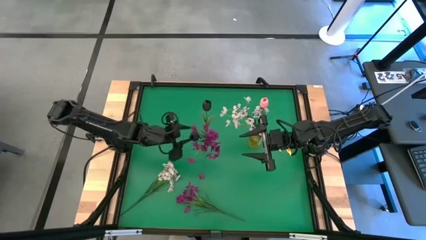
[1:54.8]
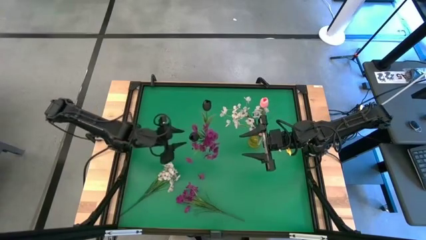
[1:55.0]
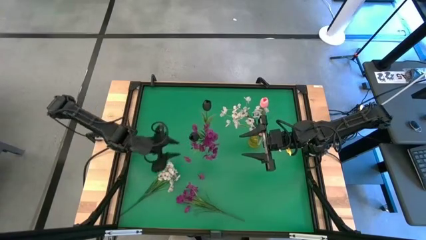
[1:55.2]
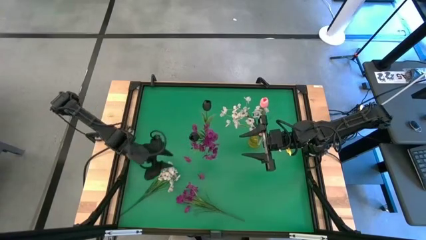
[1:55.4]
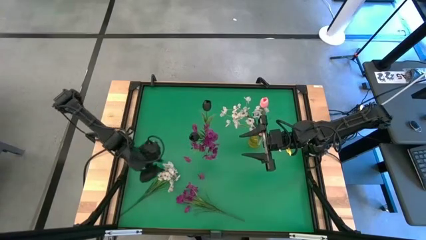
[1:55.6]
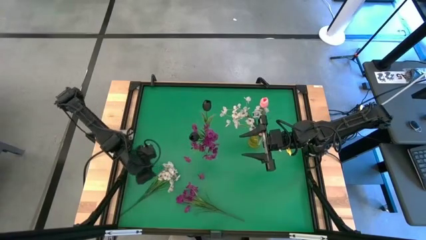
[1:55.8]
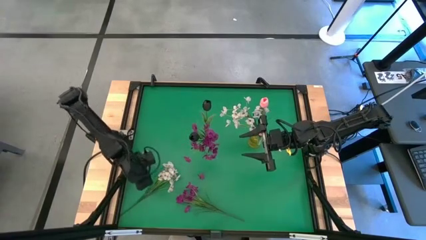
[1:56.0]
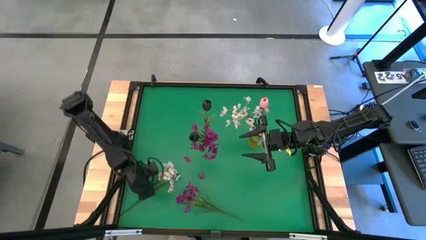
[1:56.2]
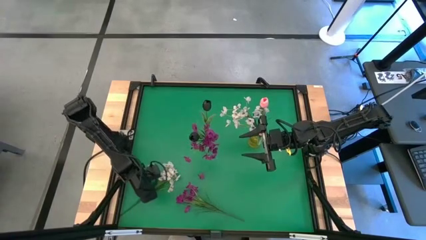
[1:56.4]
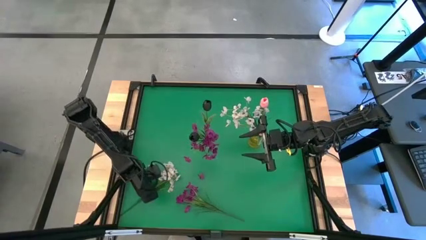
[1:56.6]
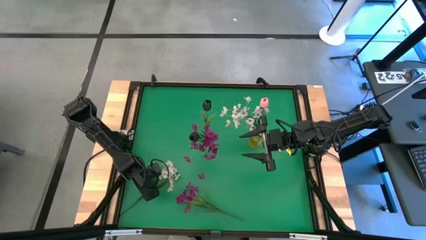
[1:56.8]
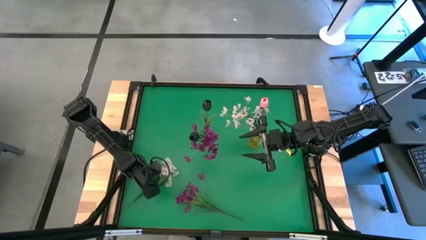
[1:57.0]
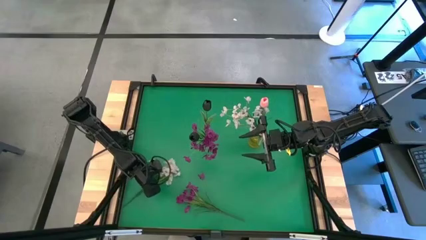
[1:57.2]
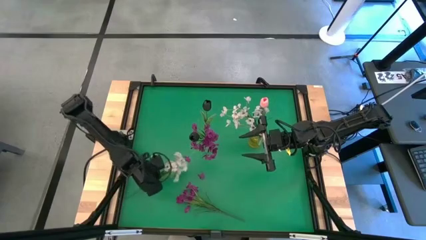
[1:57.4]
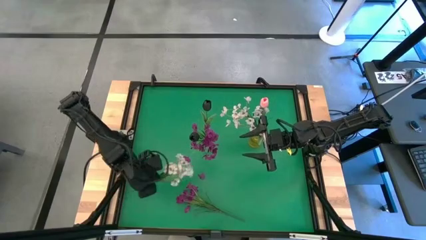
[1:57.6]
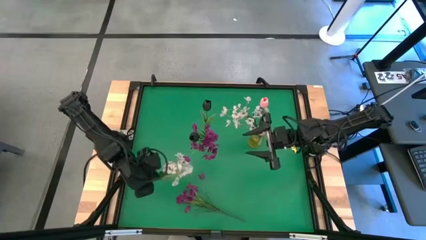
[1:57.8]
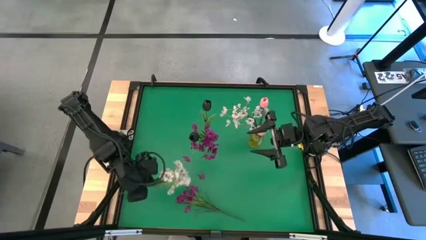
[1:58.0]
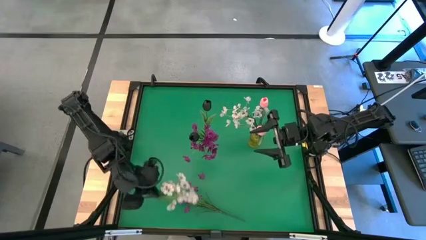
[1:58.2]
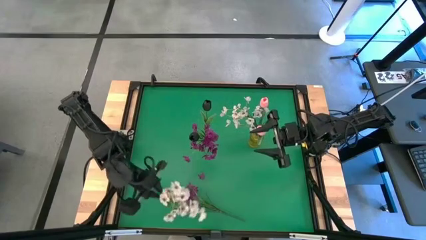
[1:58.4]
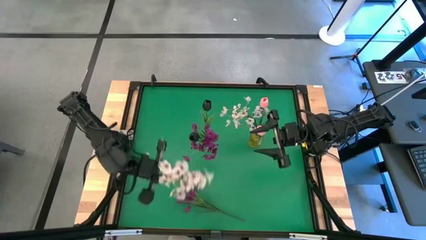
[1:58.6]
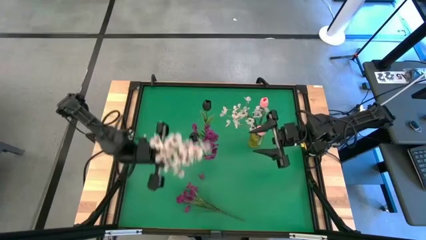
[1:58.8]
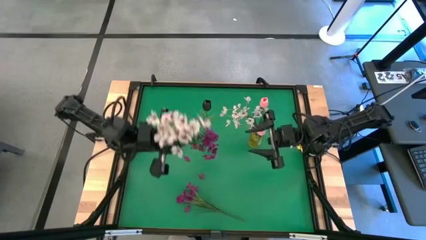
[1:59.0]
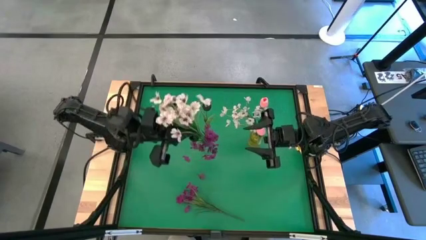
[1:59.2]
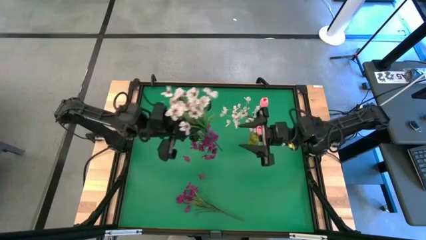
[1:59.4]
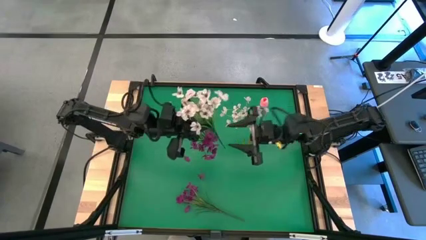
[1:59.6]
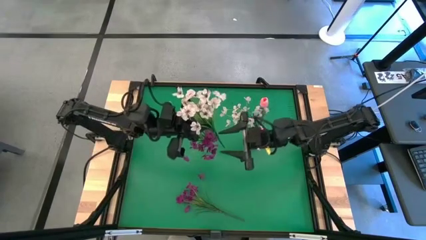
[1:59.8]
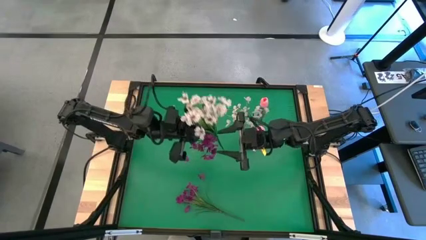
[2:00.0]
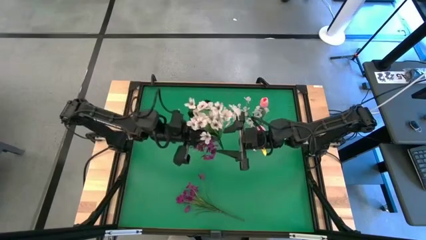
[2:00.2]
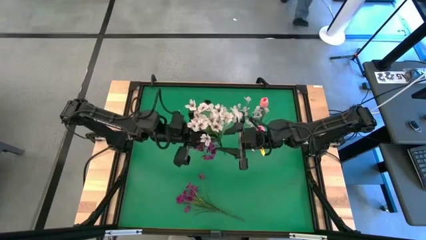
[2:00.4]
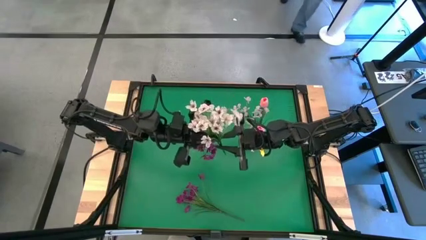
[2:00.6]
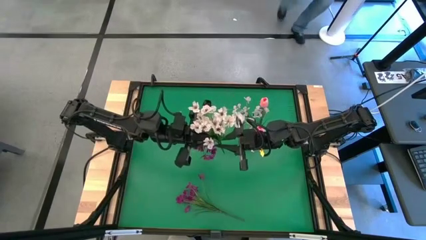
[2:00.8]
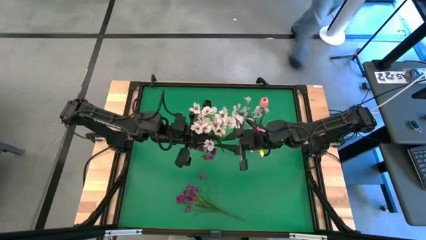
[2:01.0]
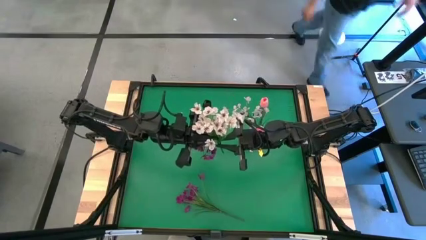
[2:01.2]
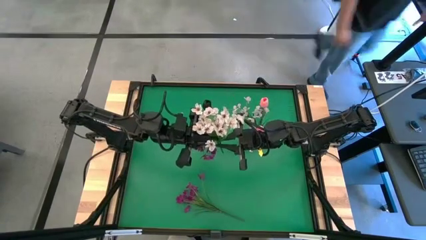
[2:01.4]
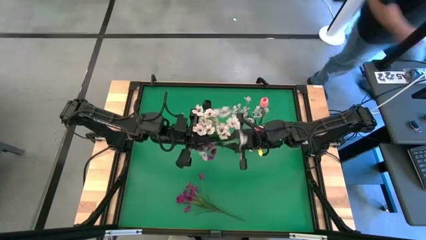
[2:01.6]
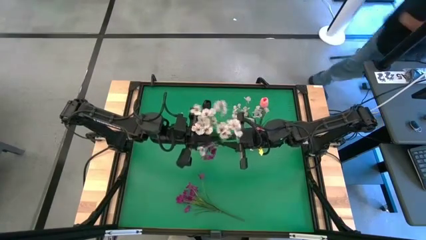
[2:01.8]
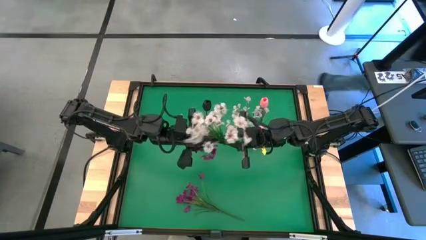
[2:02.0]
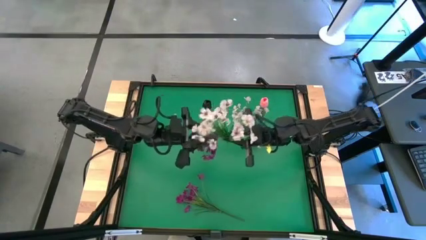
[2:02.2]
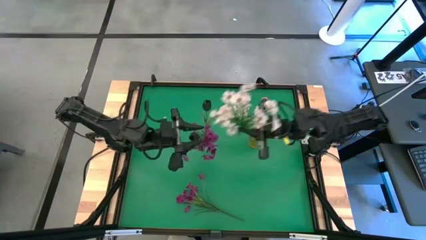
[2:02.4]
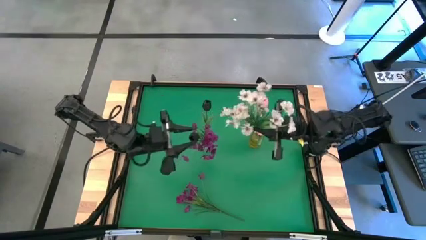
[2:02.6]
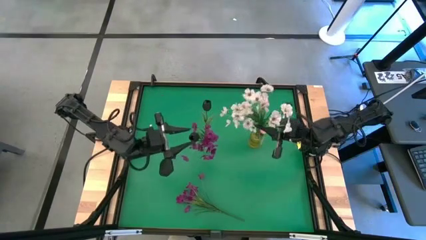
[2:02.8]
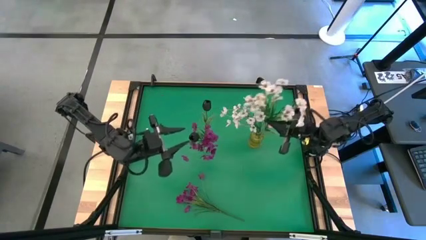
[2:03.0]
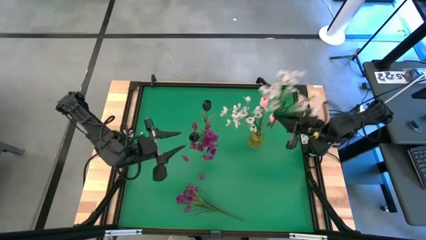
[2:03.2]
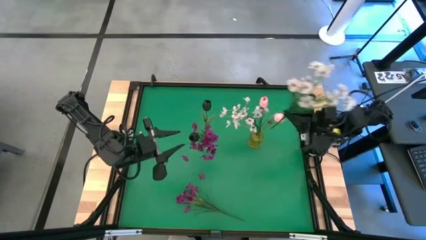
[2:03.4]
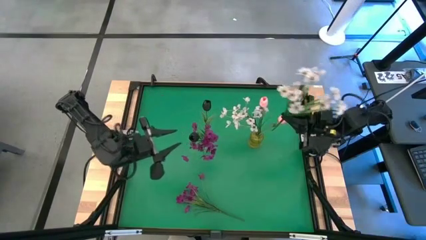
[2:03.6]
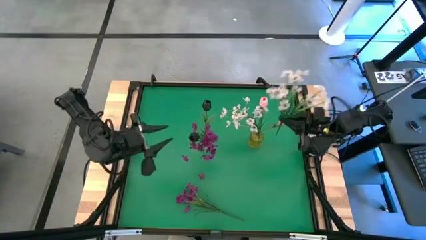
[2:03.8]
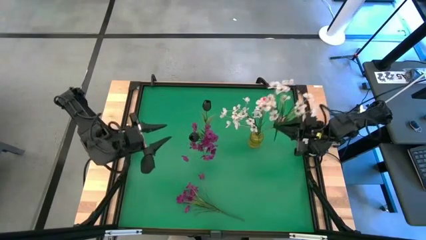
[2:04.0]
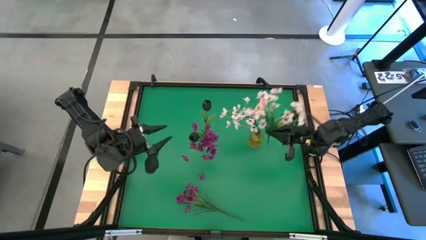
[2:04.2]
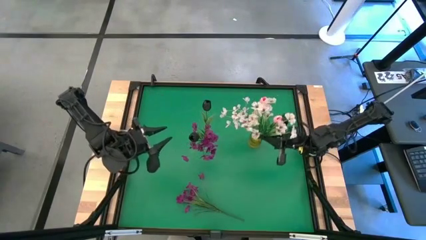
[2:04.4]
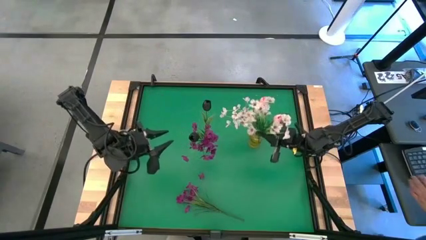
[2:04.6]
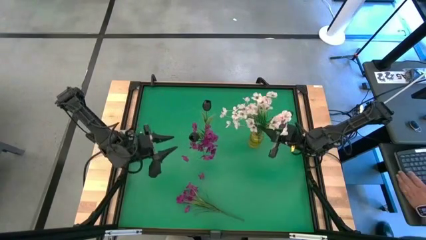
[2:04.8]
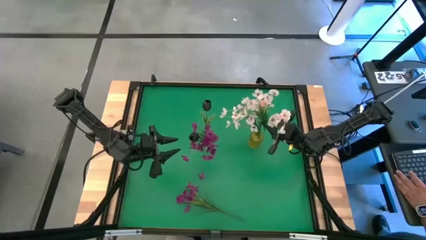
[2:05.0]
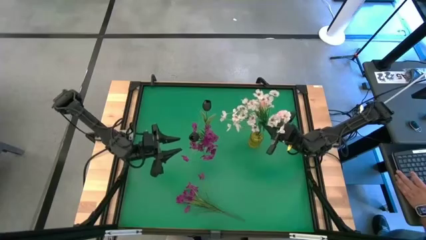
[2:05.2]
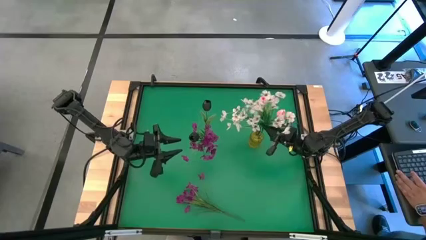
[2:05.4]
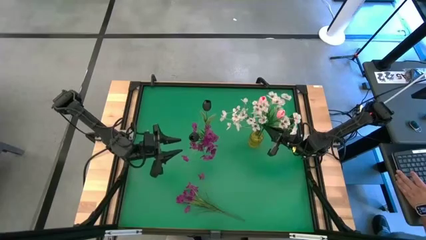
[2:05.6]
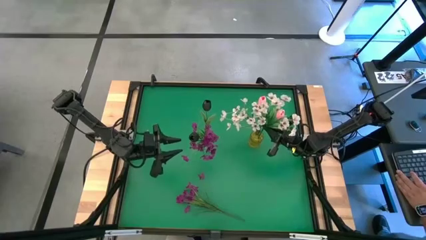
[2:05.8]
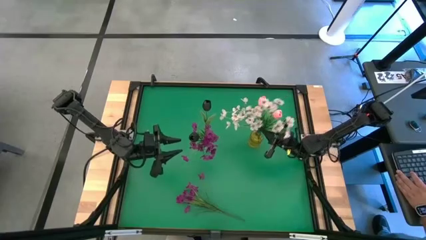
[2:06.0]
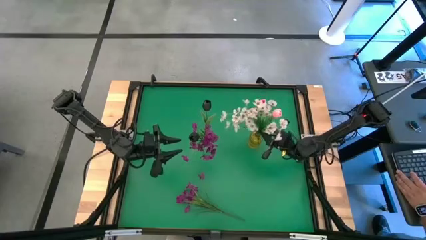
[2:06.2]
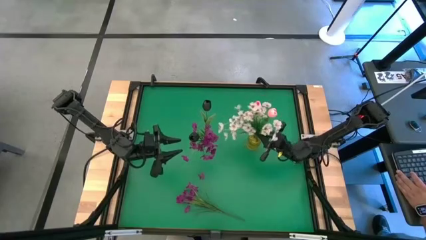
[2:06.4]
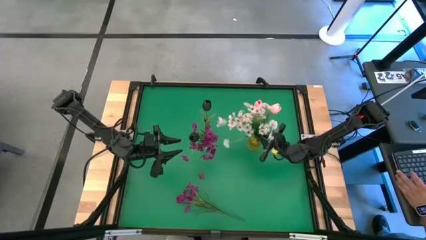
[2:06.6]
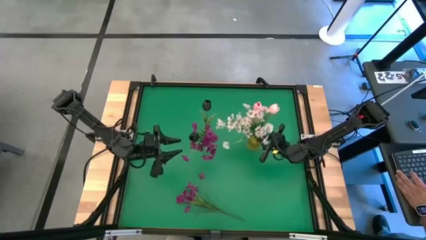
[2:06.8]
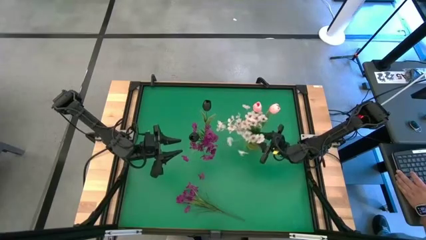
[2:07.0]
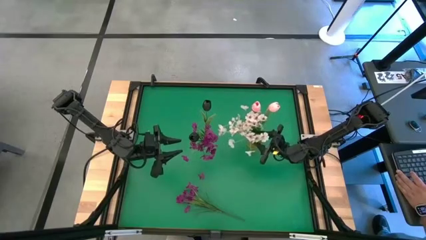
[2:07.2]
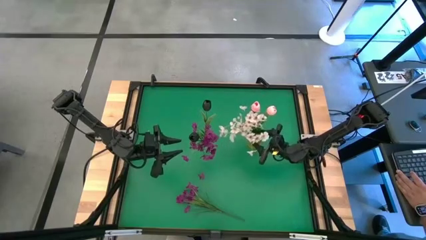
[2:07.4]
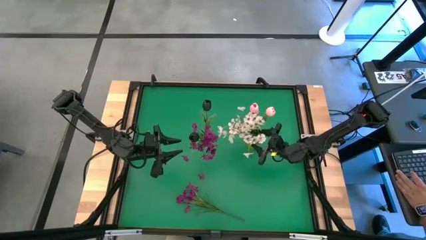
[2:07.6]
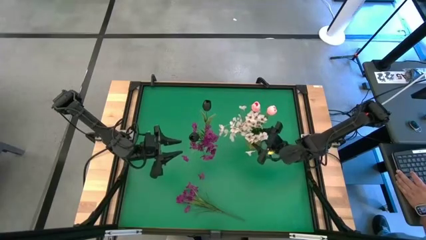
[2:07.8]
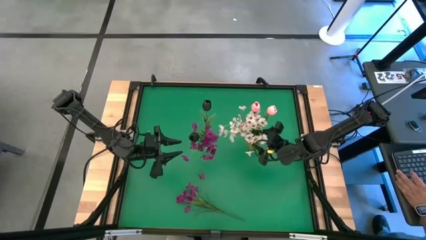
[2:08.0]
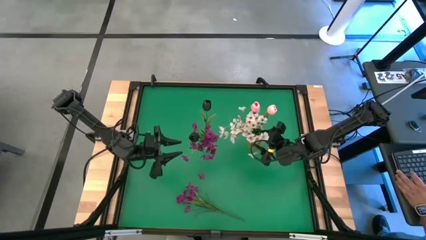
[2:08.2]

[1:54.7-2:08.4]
Task: Sort flowers into vase by color
Put the white flower into the yellow vase
